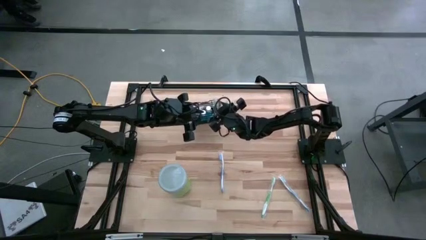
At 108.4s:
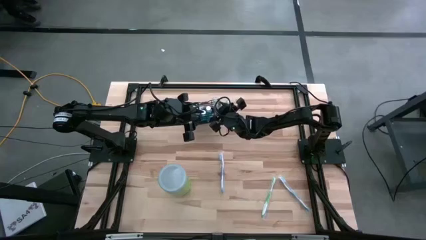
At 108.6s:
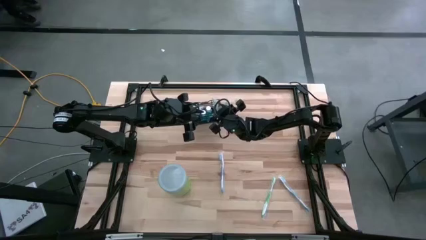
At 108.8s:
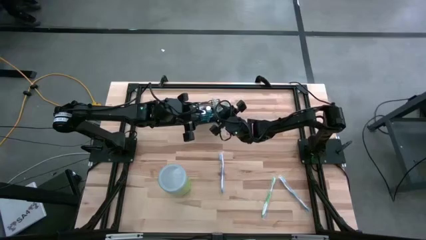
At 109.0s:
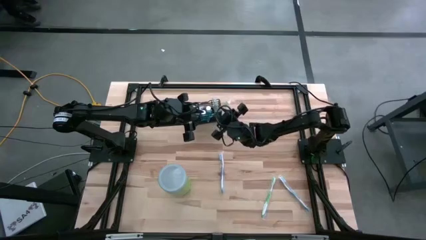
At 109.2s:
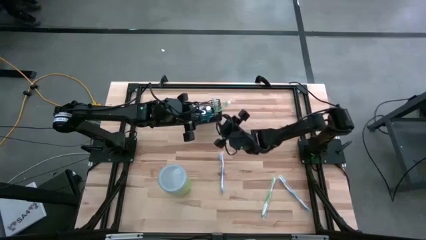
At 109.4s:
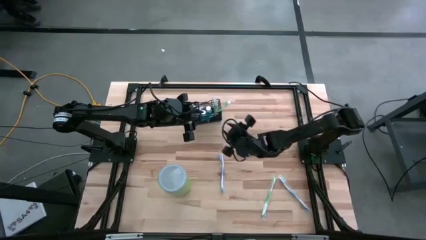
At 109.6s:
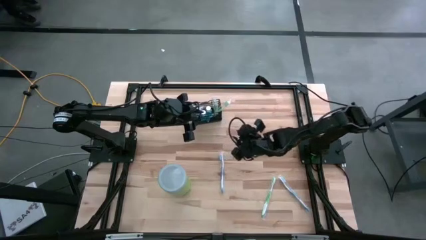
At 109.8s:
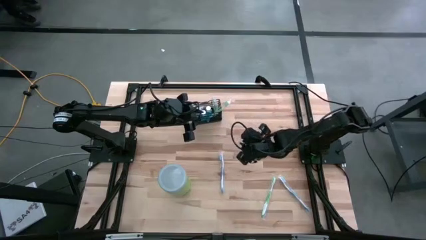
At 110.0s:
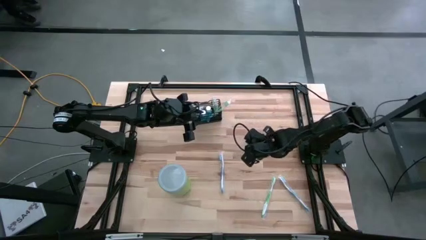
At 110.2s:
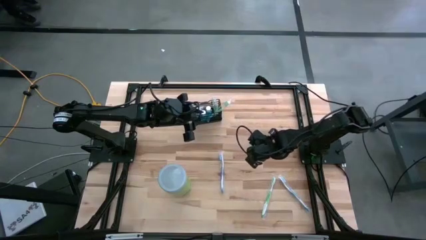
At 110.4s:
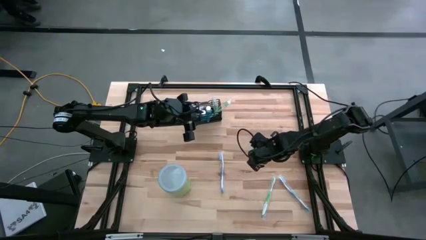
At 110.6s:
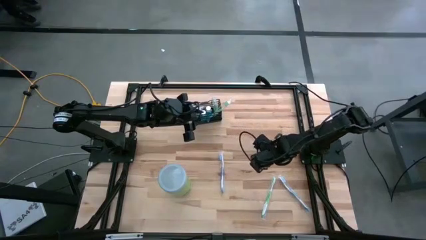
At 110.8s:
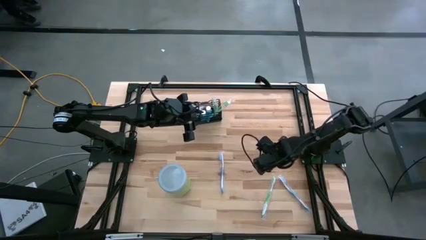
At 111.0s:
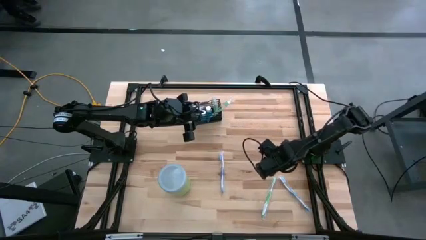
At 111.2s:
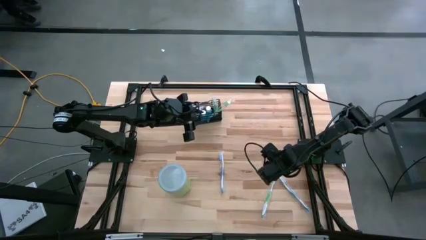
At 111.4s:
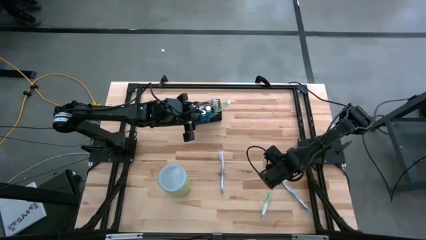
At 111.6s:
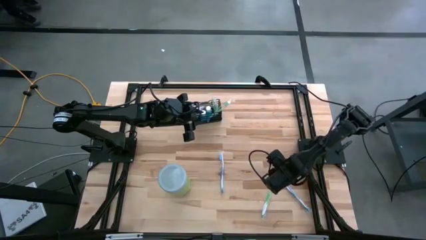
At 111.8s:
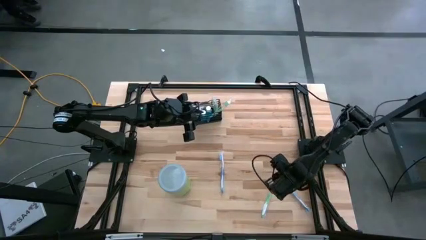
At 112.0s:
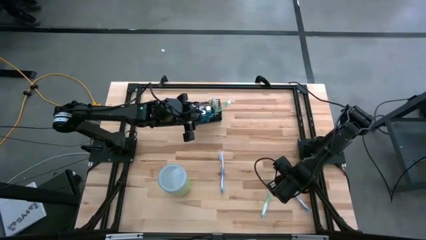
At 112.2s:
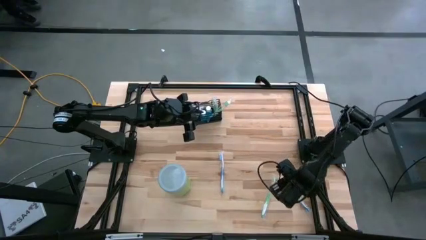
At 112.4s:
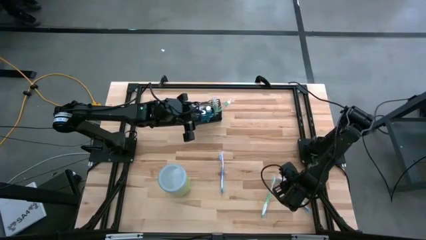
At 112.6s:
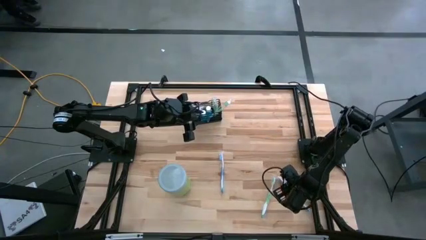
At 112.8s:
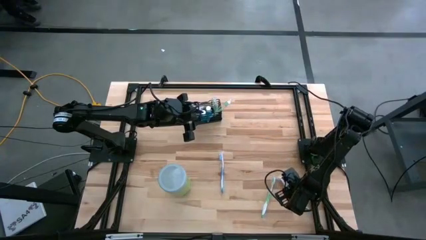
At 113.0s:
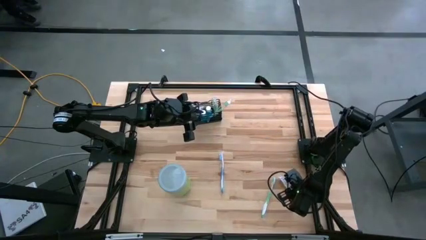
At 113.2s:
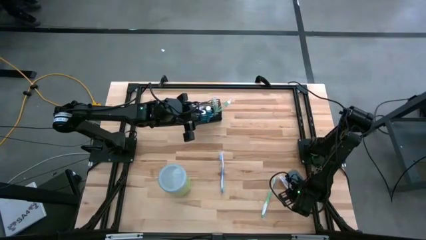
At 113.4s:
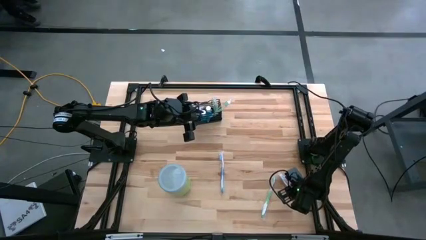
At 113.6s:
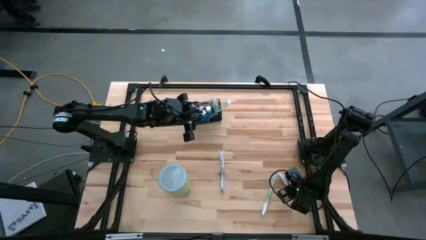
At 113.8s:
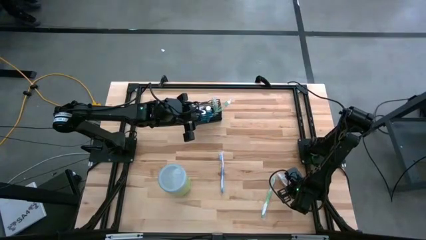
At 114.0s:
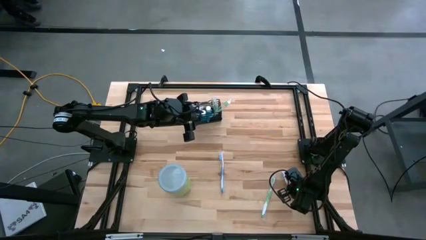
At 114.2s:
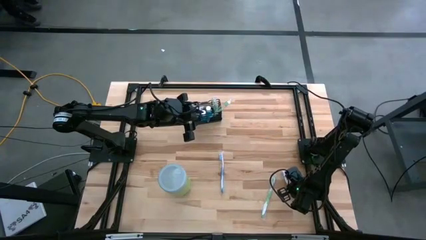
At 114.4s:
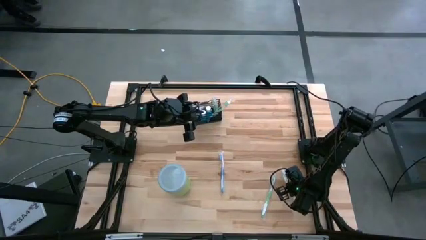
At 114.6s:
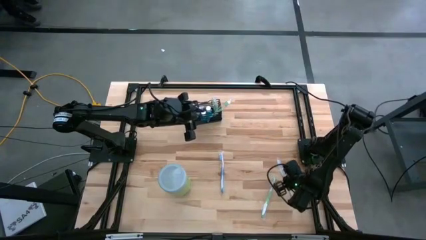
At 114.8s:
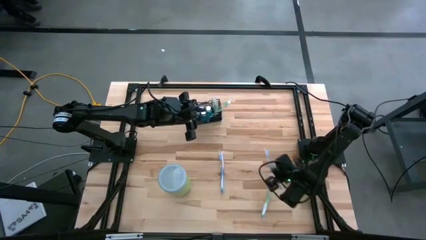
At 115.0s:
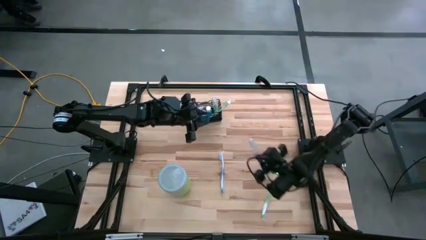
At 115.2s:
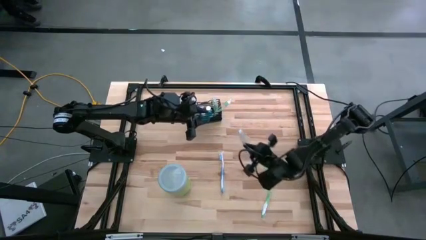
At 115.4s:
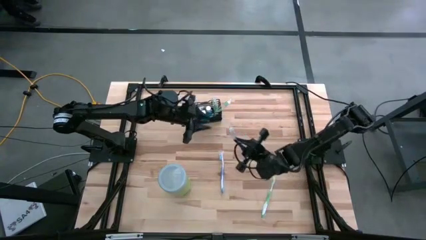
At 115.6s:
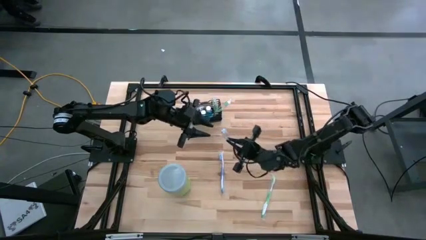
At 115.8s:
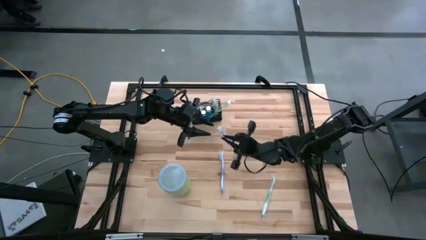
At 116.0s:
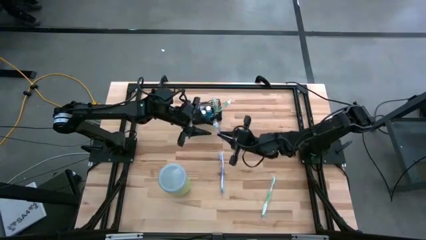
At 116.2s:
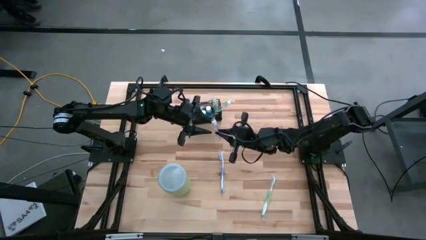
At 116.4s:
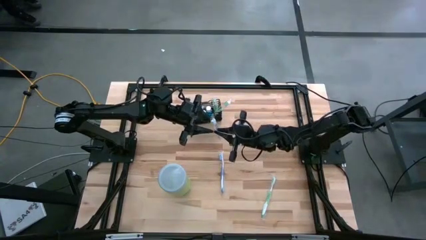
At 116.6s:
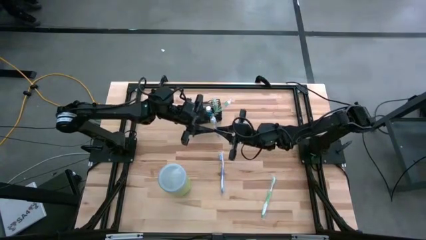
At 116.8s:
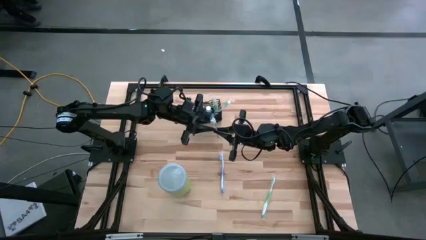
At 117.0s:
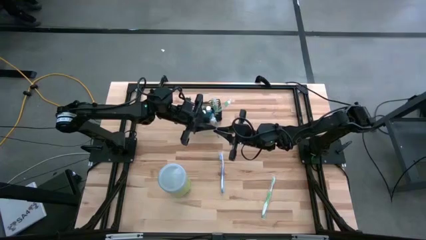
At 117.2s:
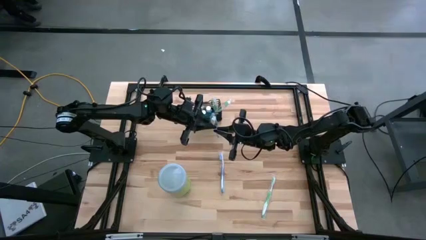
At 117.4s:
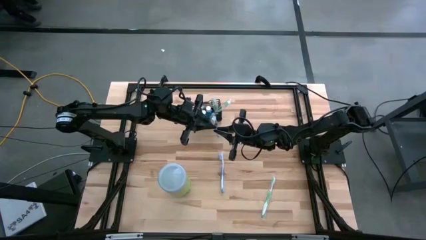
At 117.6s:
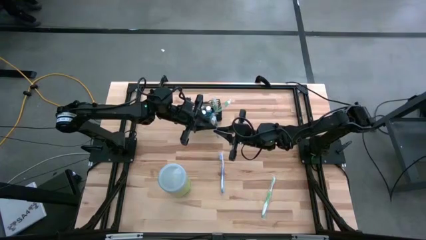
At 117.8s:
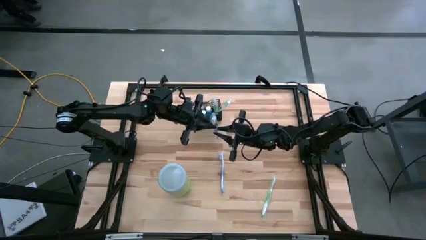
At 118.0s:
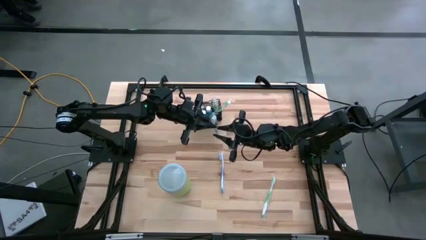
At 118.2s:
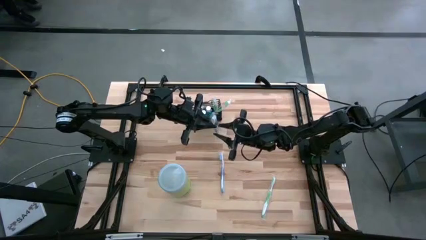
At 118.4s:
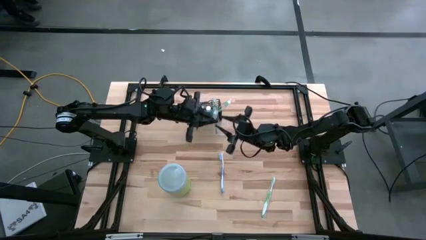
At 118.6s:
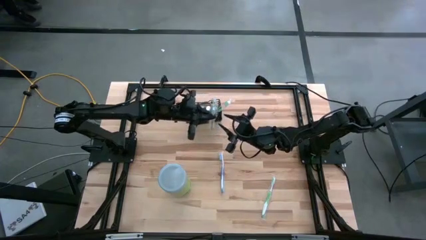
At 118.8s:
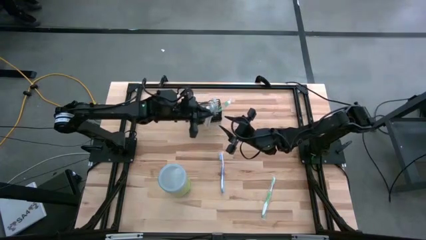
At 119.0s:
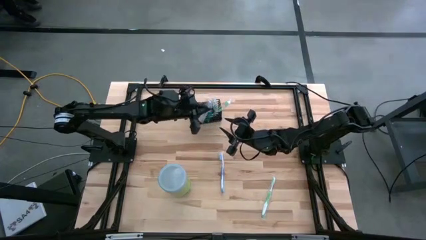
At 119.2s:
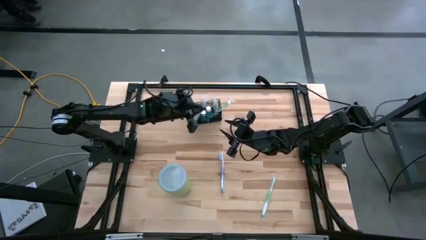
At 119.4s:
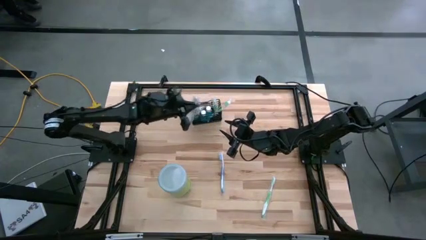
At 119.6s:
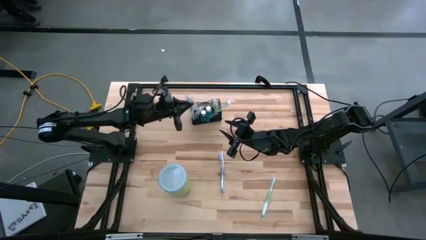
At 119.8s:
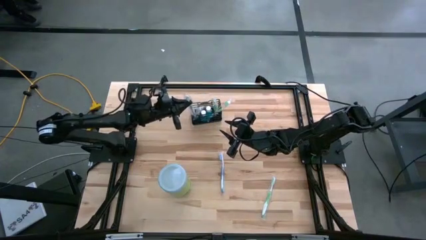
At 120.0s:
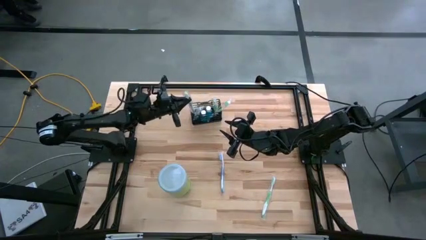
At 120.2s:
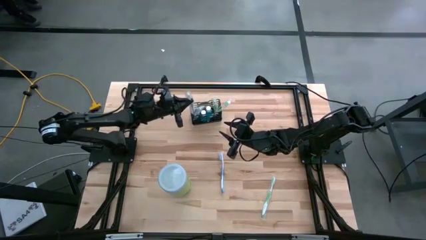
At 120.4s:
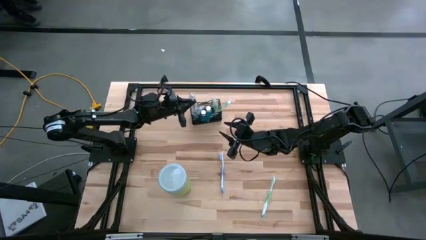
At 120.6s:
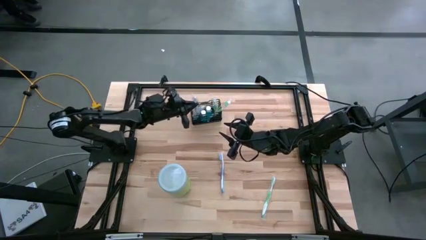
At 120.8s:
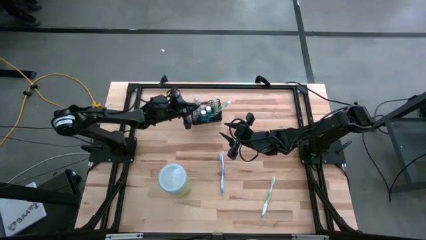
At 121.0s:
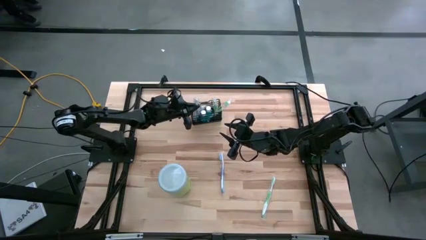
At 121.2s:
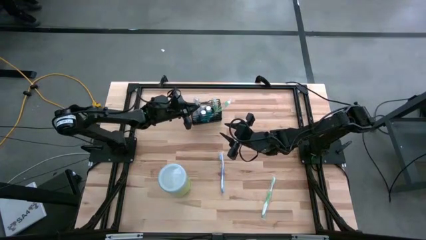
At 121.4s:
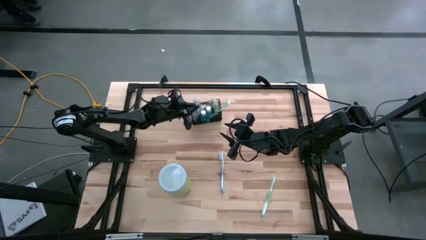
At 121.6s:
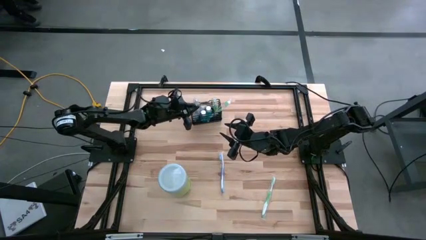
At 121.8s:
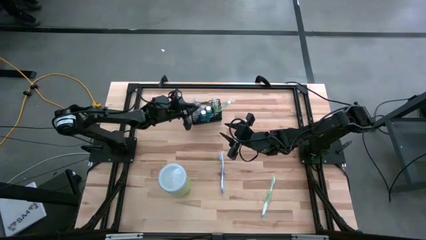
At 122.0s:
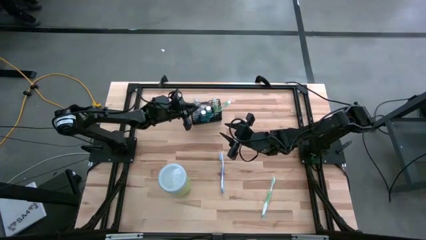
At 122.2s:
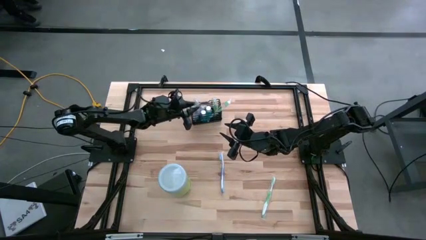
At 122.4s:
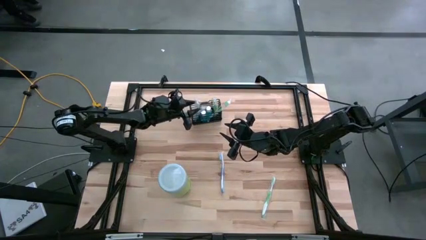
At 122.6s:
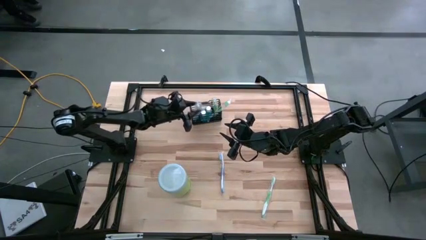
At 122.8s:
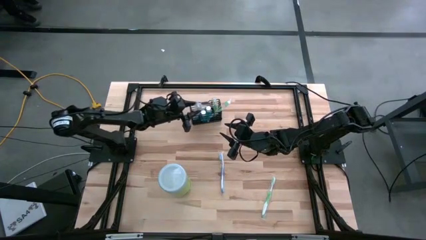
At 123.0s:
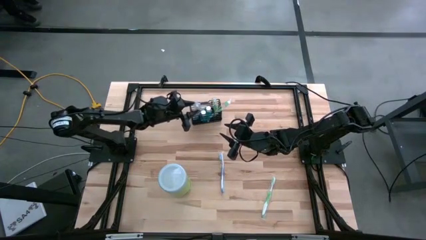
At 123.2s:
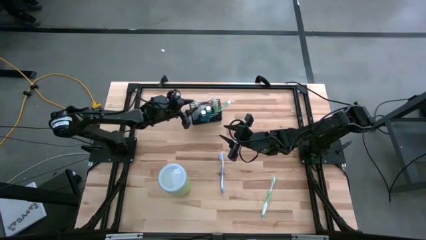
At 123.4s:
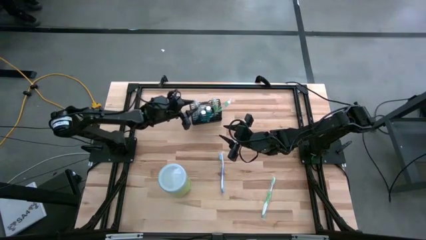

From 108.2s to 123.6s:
Task: Pick & Place toothbrushing station
Put the bottom blue toothbrush into the black mesh mesh organizer

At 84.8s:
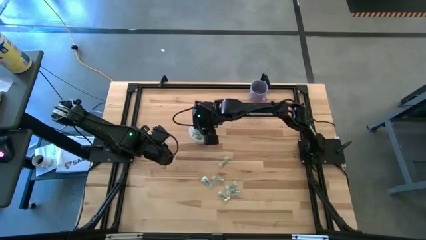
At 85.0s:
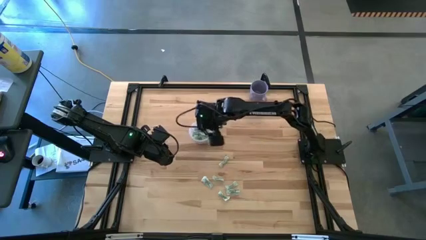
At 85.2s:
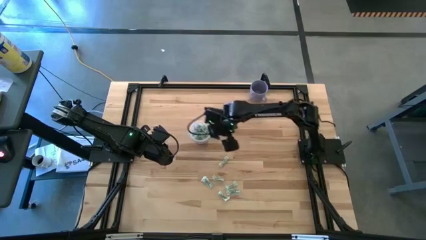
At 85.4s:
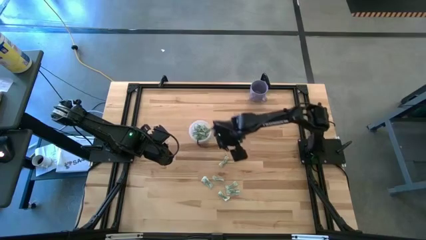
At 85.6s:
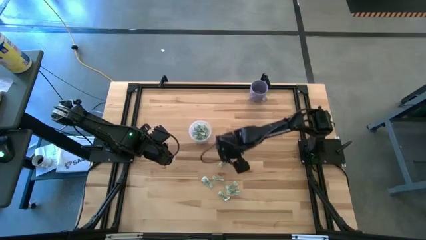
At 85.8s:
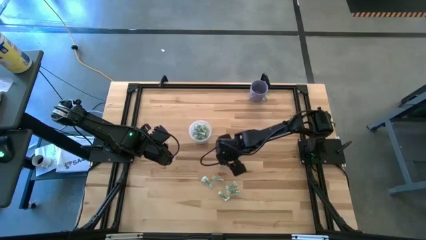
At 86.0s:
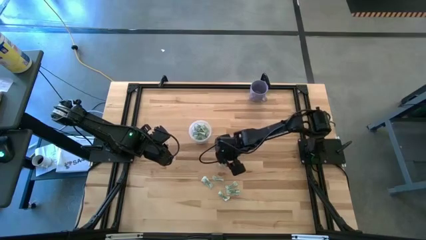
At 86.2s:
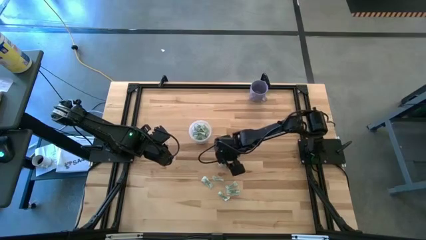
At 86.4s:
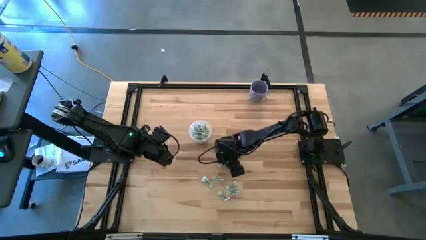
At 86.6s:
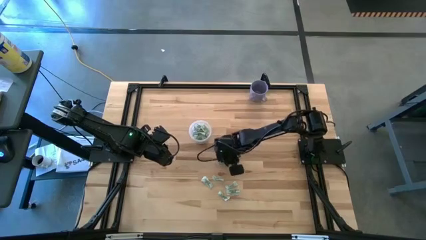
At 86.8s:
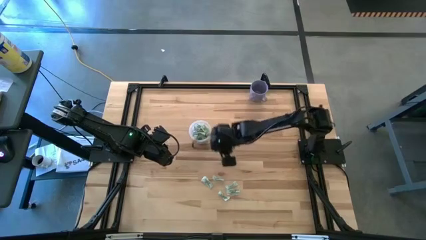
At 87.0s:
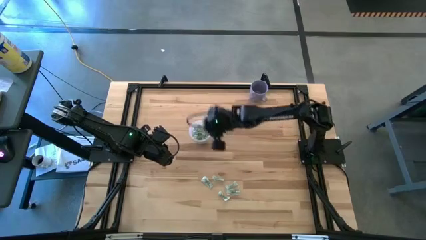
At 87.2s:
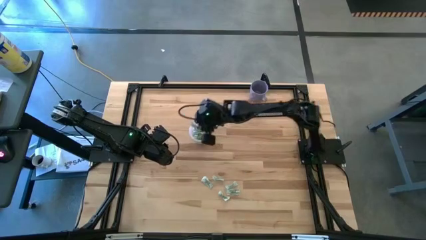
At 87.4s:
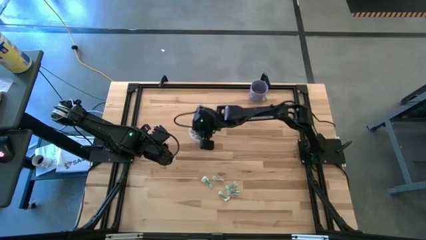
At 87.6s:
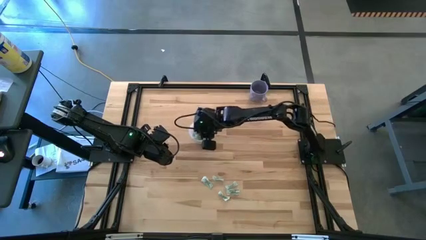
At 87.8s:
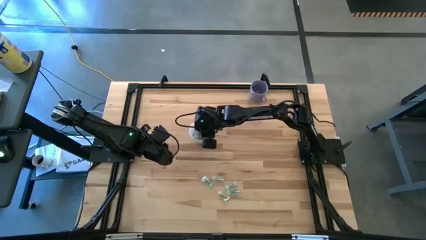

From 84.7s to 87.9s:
Task: Pick and place Stevia / Truvia into bins
Put the white stevia packet into the transparent container
